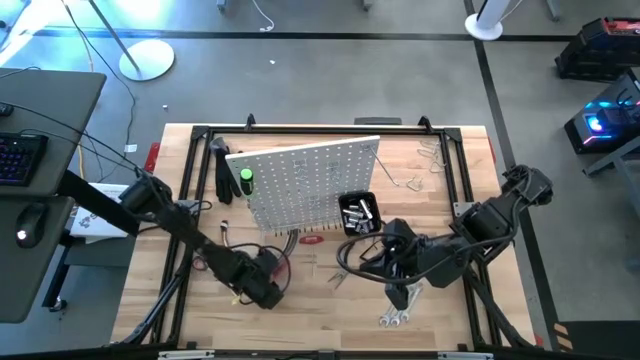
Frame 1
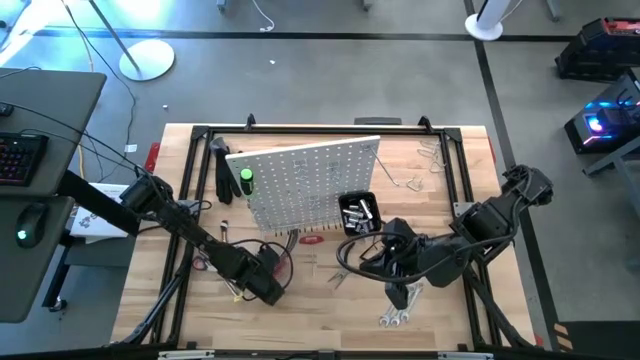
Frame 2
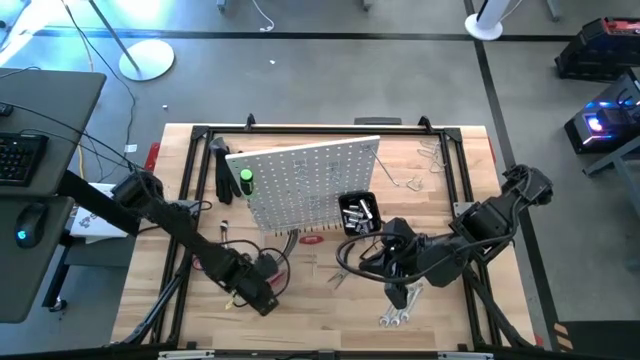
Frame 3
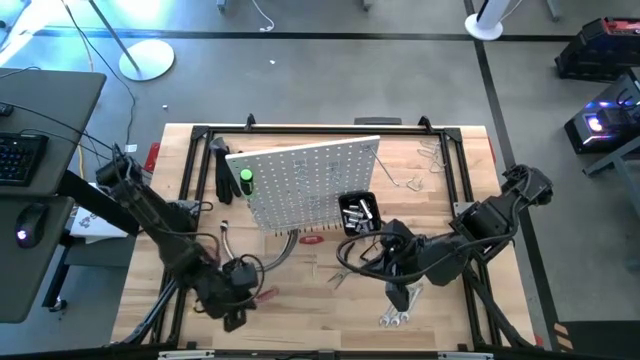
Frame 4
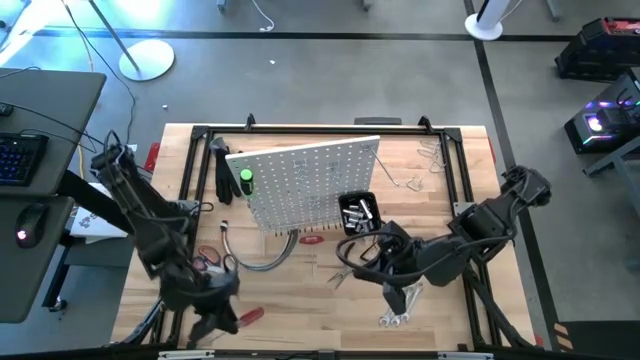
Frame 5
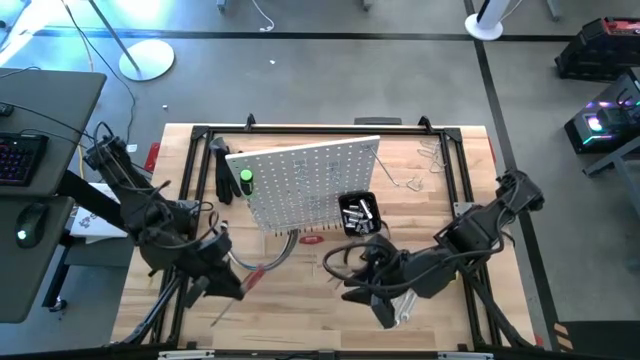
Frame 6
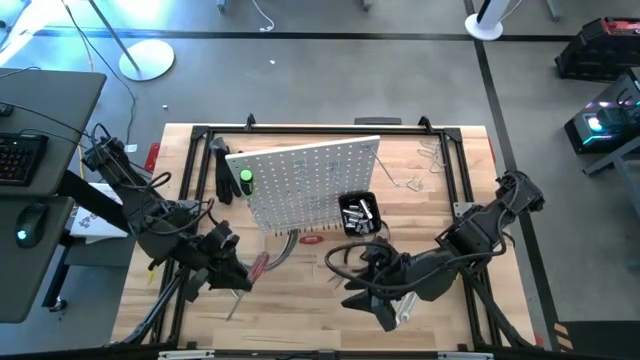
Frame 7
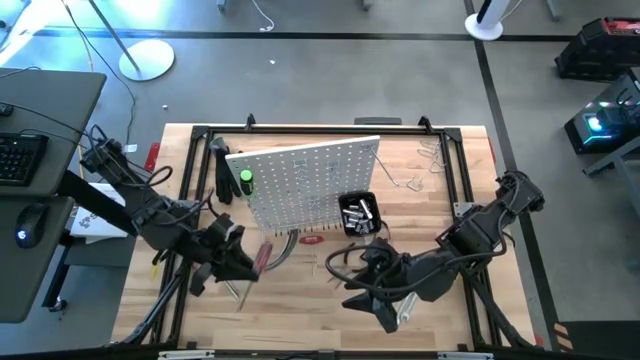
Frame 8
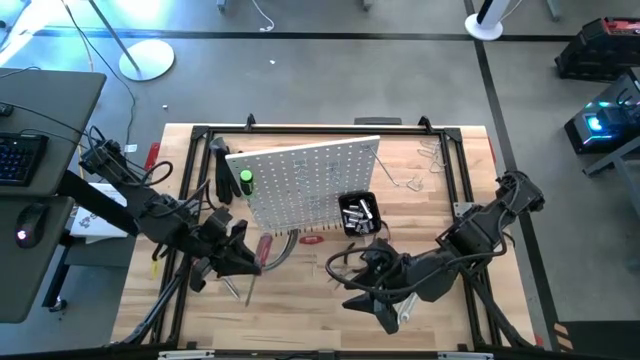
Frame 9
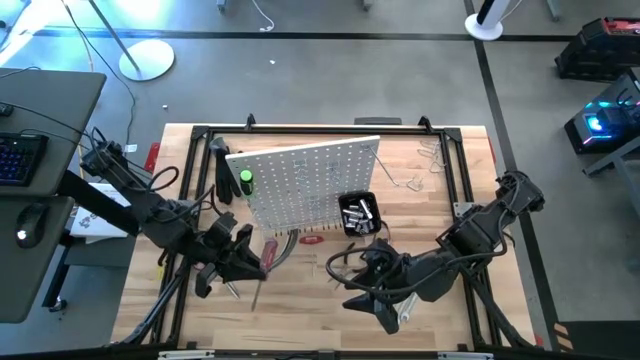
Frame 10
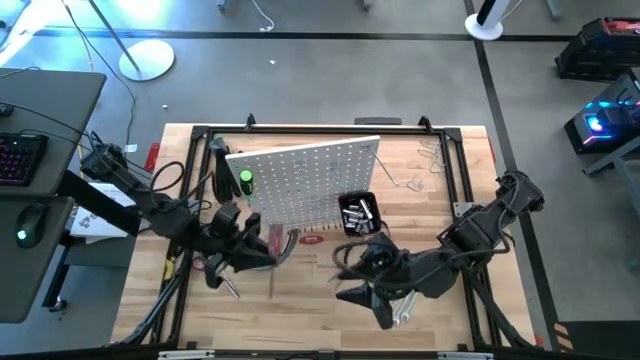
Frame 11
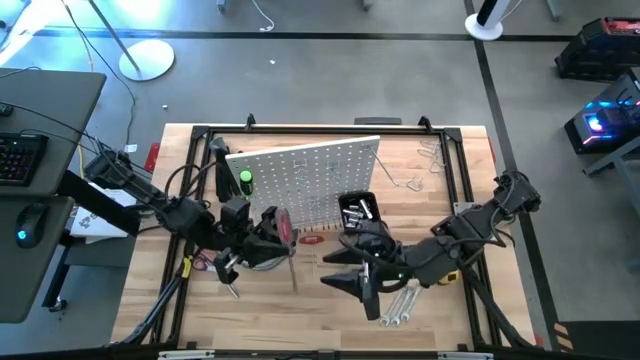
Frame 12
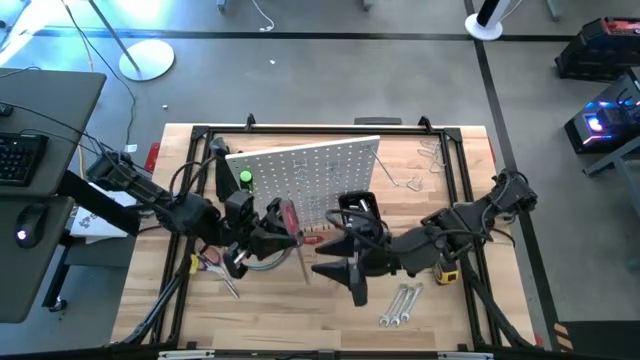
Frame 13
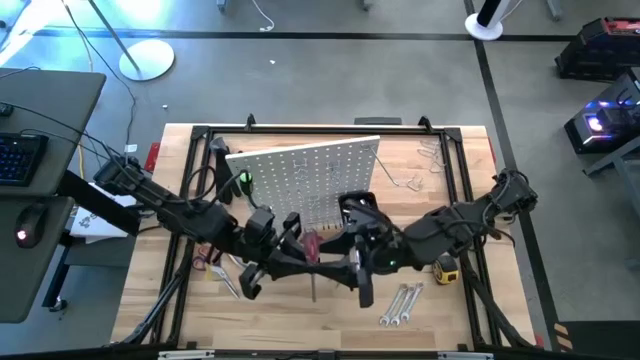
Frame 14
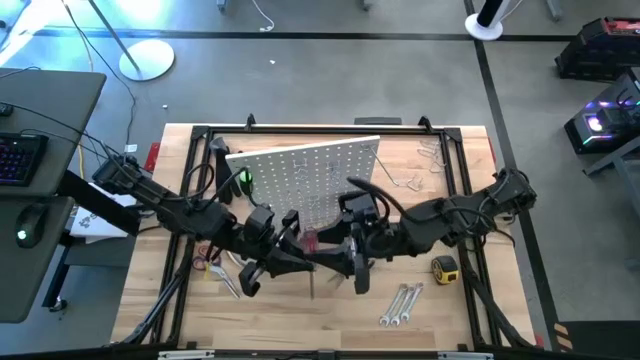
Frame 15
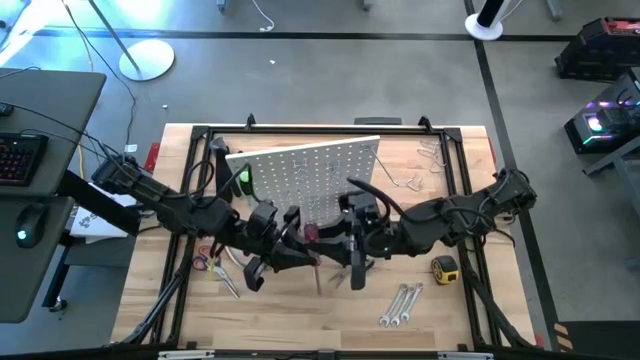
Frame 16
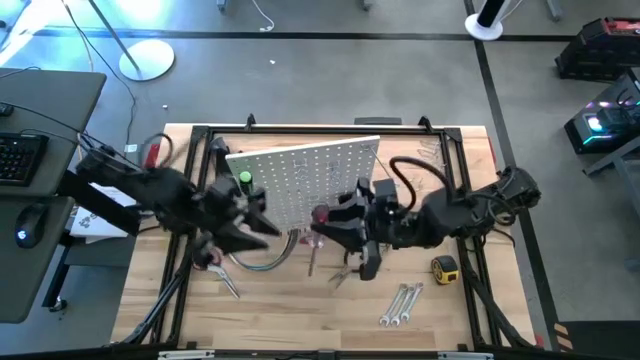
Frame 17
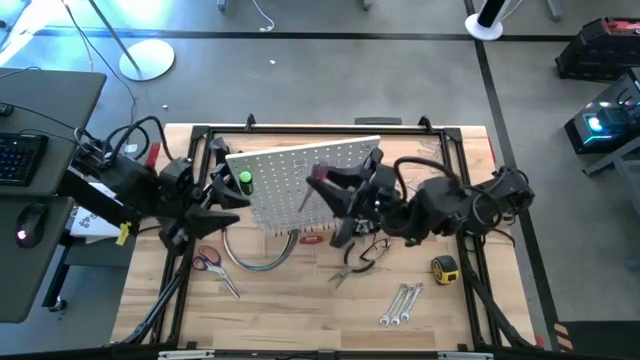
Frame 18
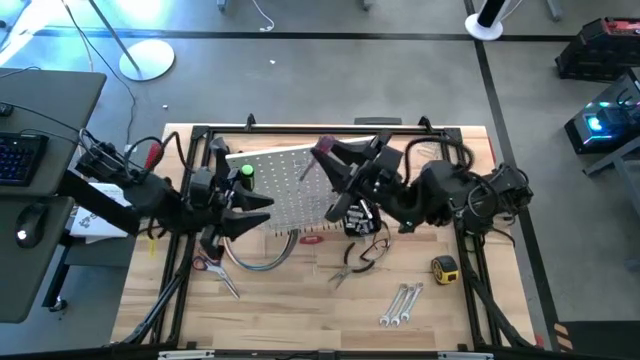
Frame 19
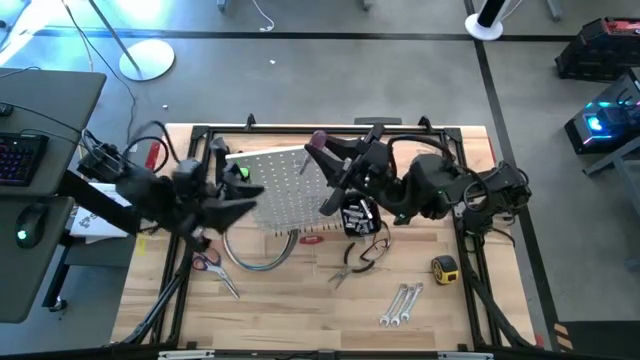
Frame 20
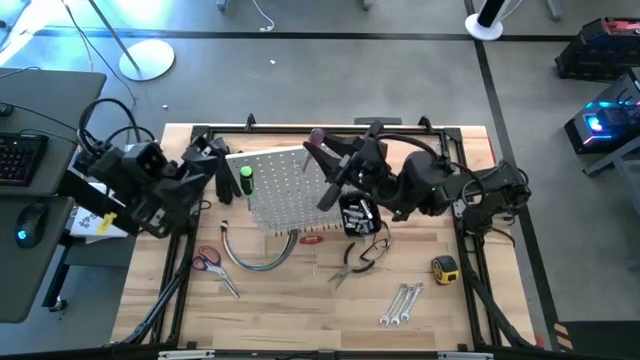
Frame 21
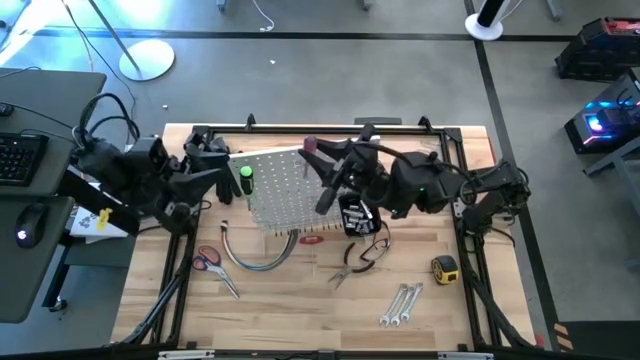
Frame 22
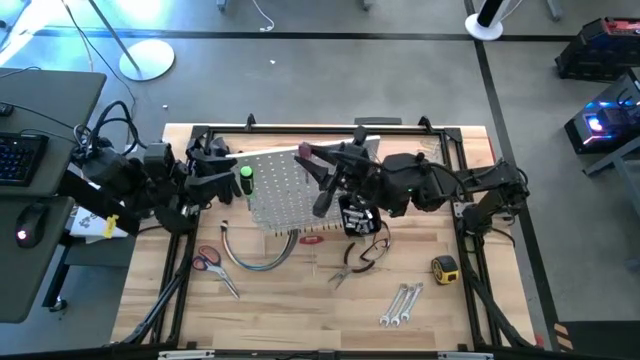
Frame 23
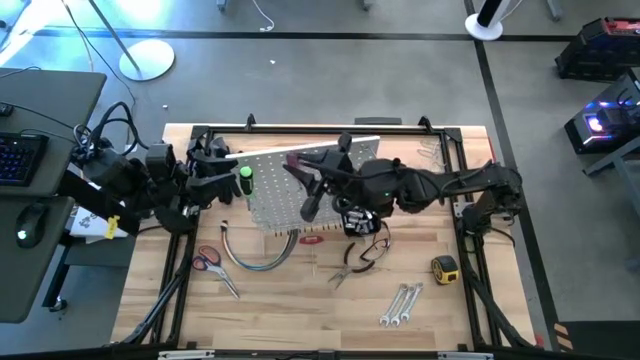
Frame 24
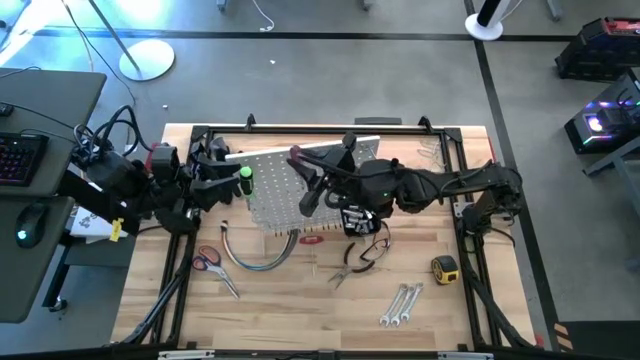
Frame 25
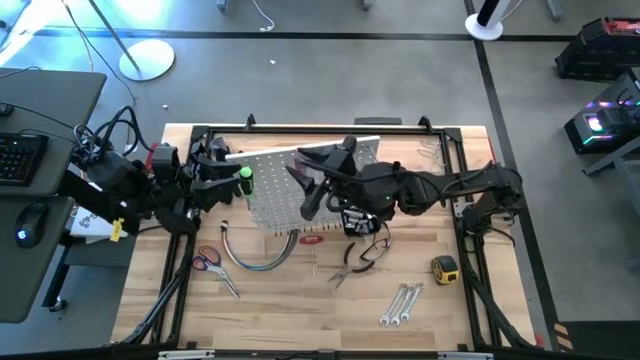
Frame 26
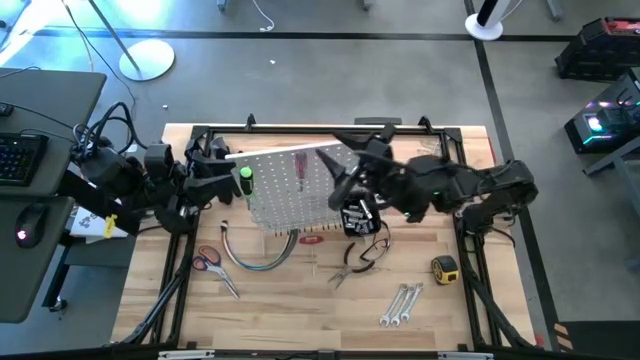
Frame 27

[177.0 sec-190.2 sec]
Task: Hang tools onto peg board
Hang the red screwdriver on the peg board

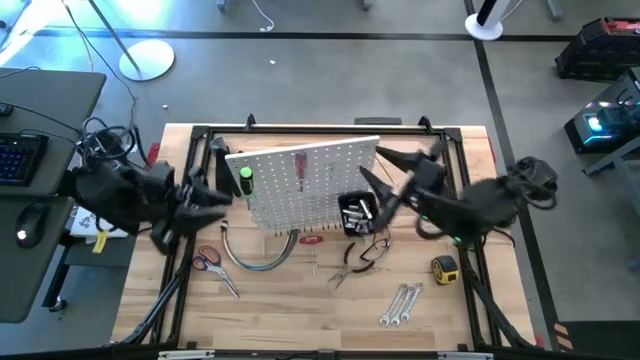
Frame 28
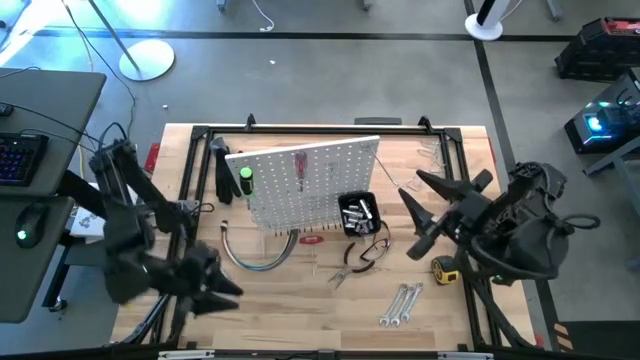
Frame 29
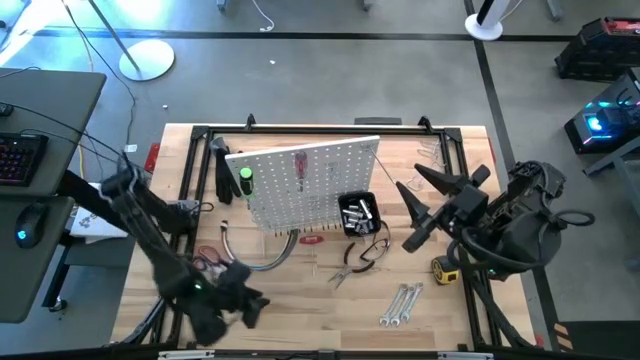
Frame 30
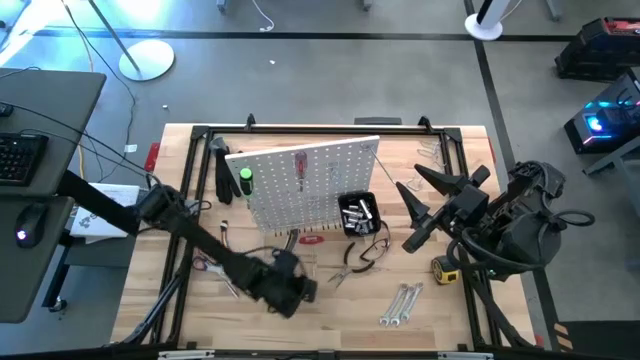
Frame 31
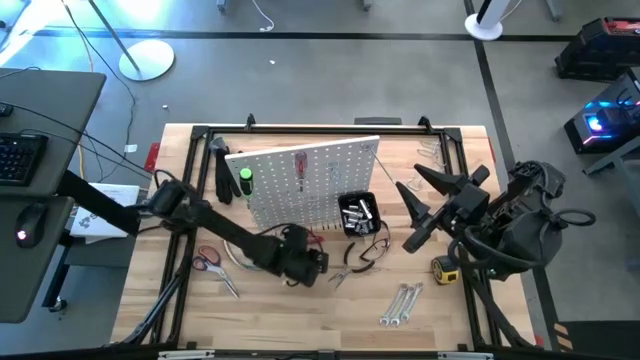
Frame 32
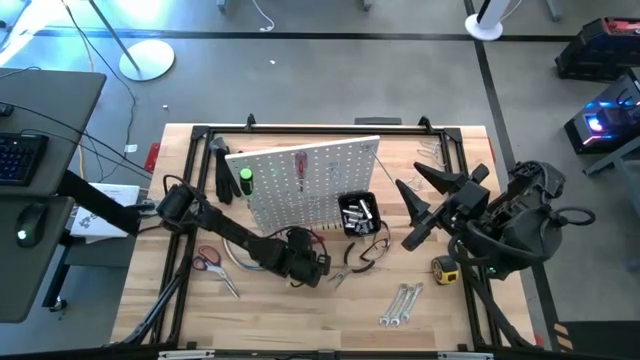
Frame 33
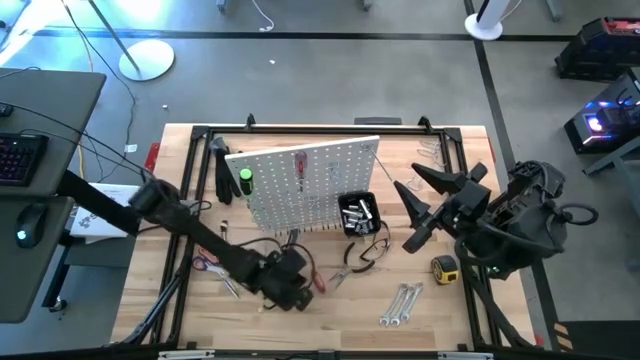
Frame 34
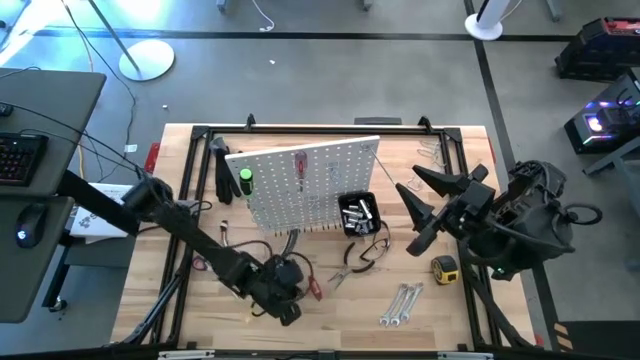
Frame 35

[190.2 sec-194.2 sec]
Hang the red allen wrench on the peg board

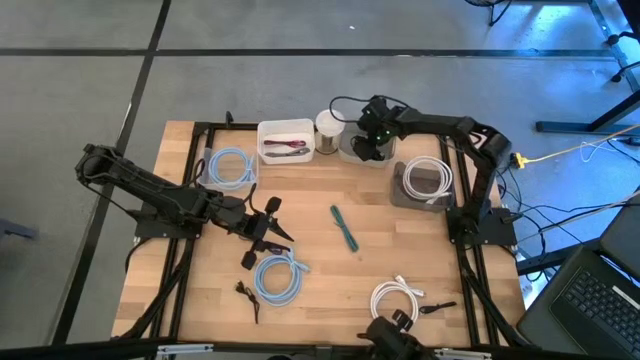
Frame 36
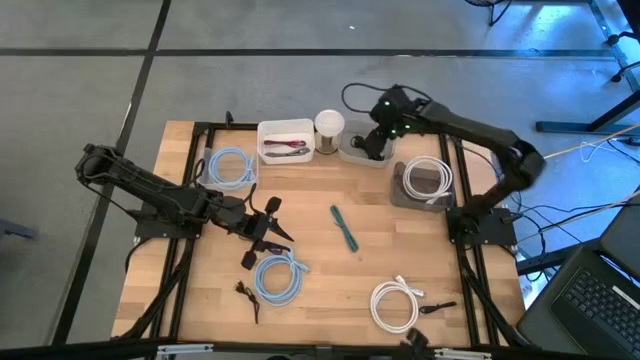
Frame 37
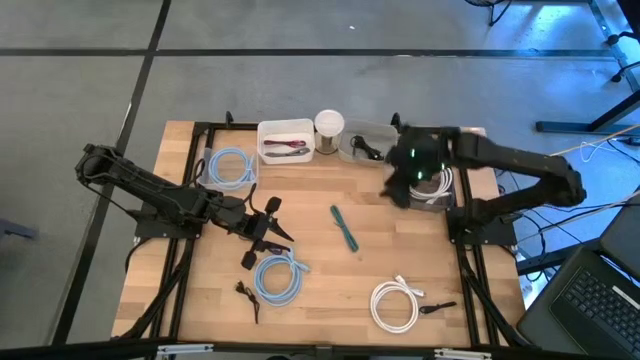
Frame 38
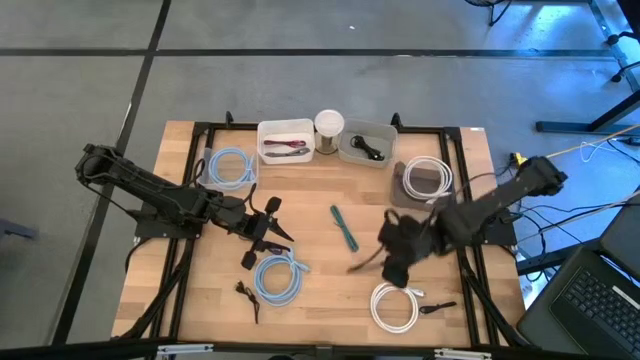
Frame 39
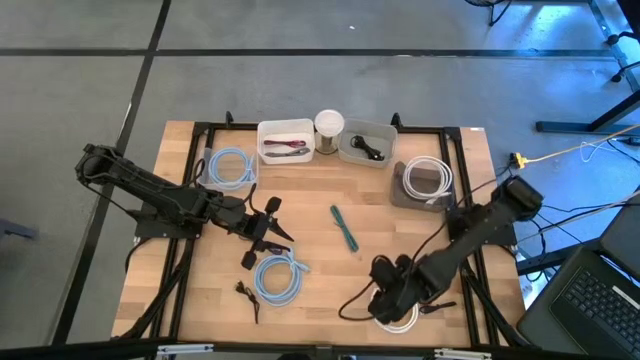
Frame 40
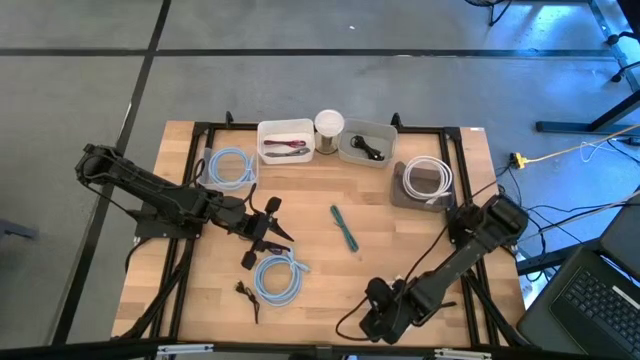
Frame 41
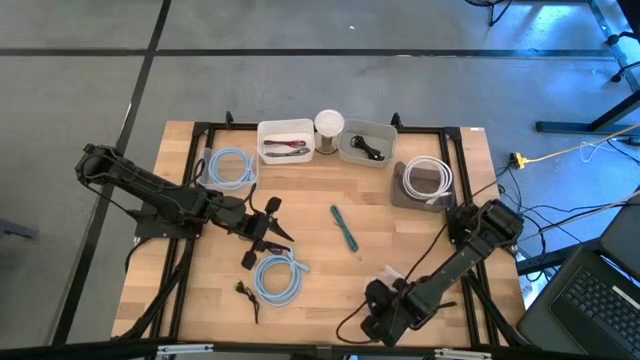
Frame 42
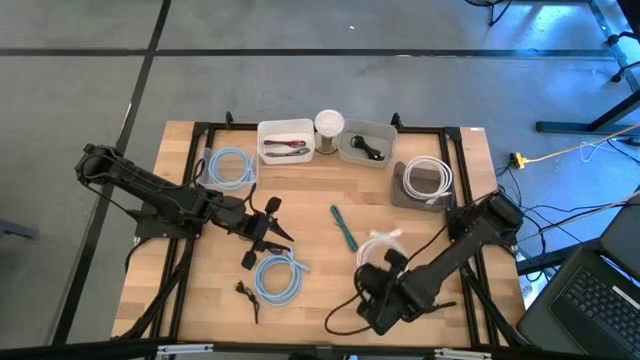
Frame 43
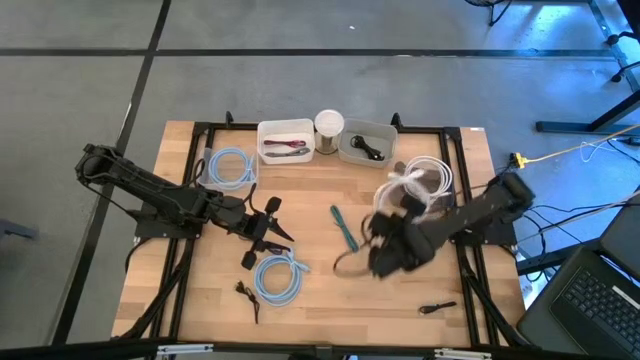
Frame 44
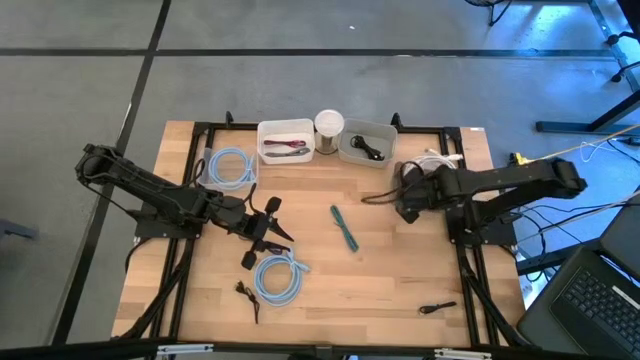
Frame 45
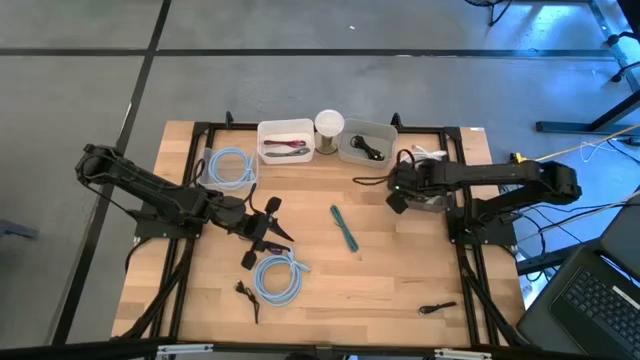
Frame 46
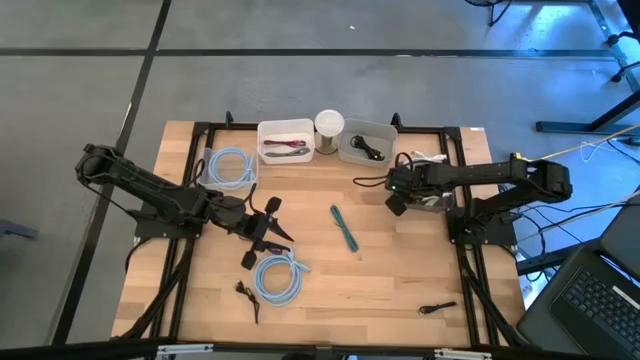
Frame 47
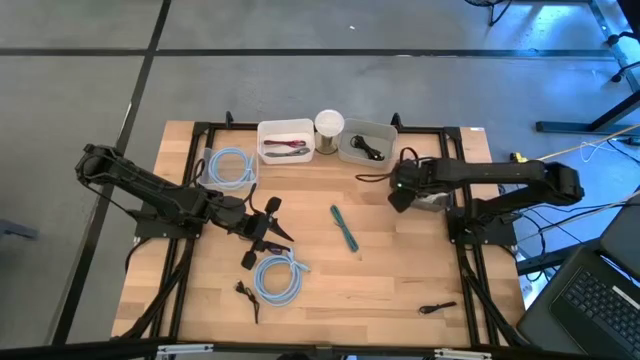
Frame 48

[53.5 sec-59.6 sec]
Task: Pick & Place USB Port
Put the white HDMI cable into the black bin
